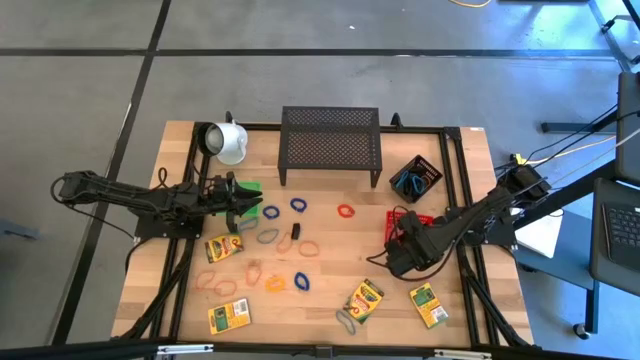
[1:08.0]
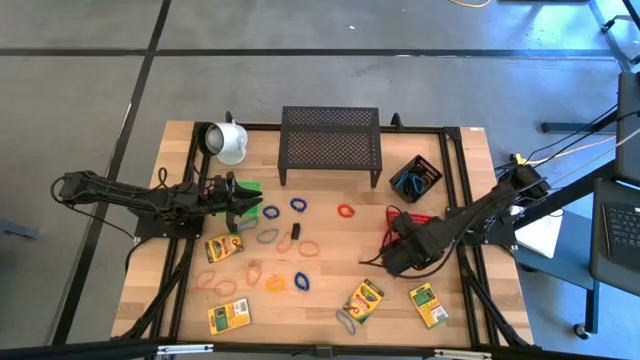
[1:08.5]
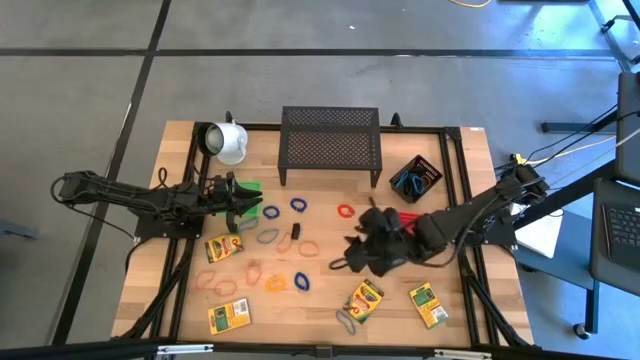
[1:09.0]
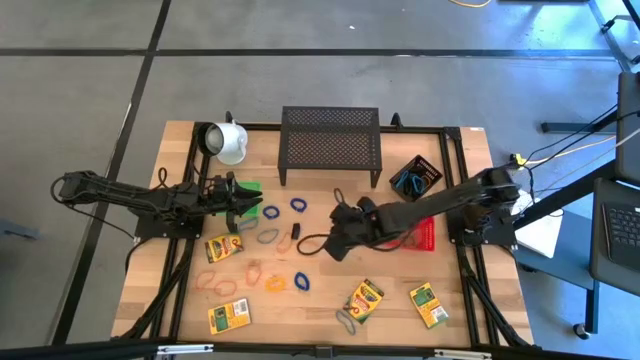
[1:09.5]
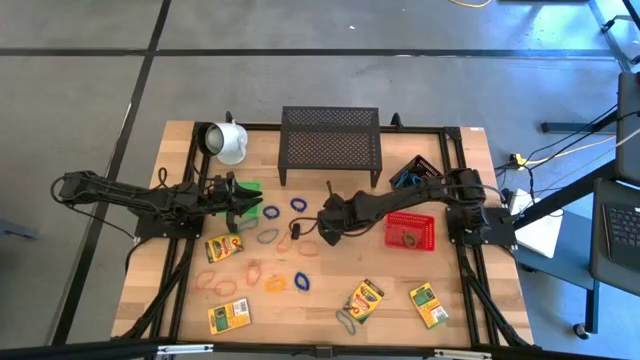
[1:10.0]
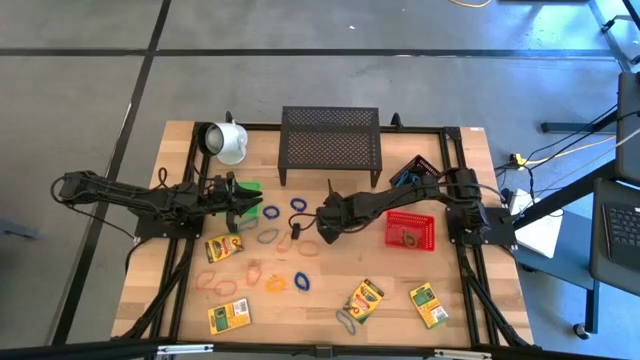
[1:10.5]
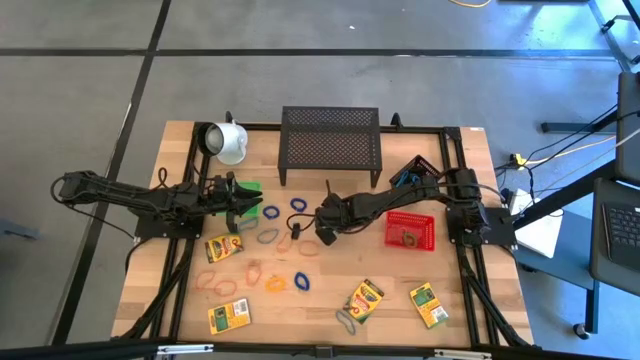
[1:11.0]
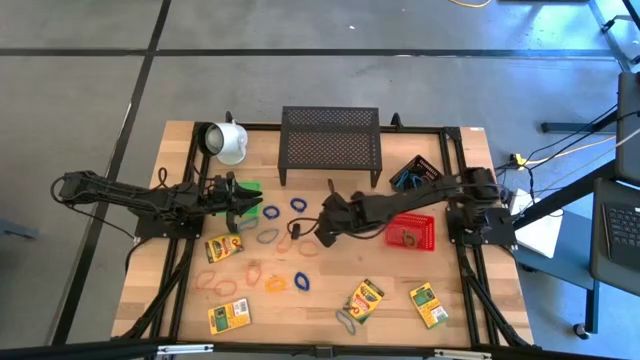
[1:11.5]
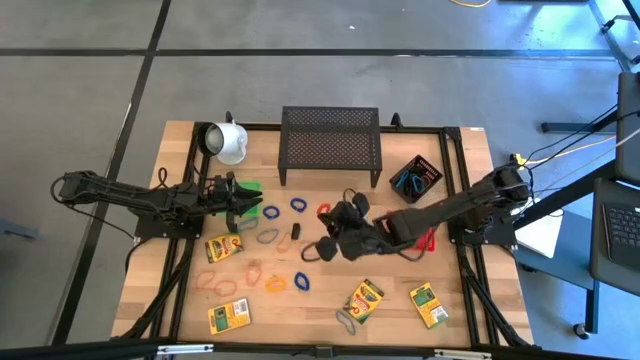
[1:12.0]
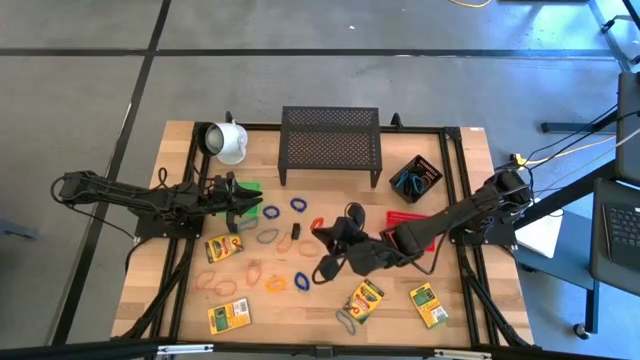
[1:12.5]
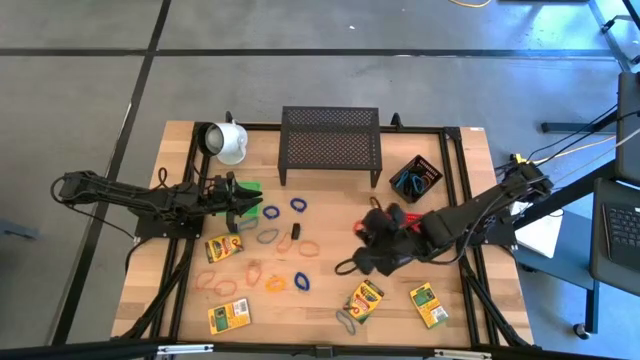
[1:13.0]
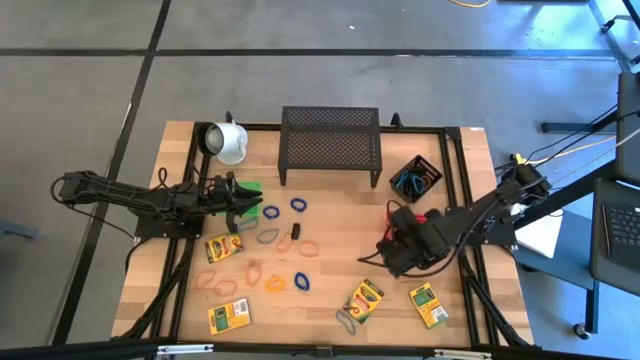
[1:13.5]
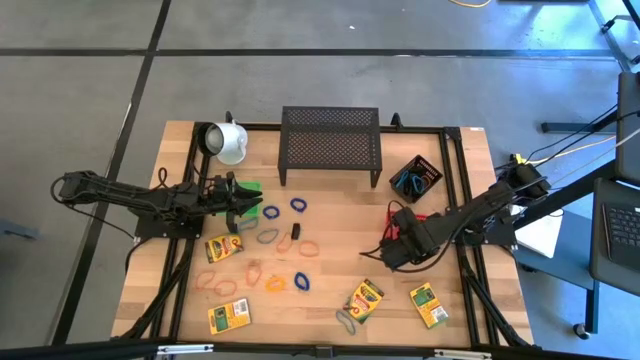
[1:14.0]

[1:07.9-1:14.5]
Task: Pick & Place Office Desk Supplies
Put the orange spring keychain into the orange bin

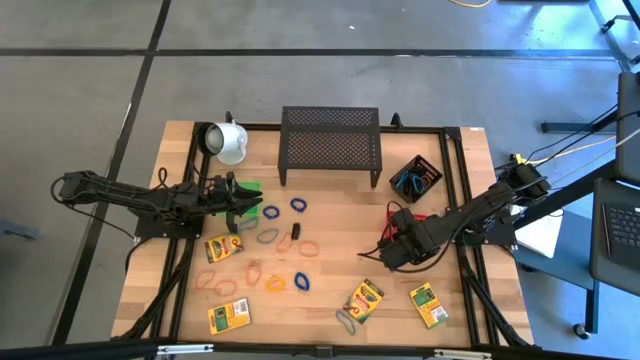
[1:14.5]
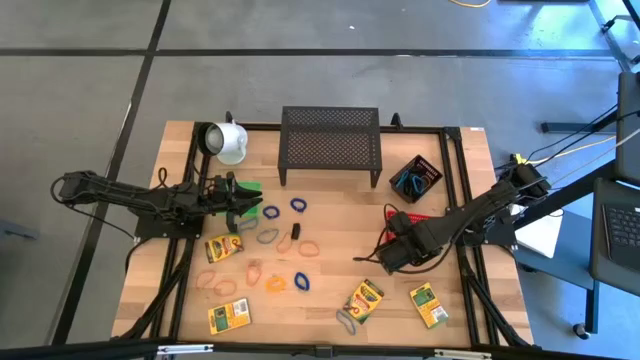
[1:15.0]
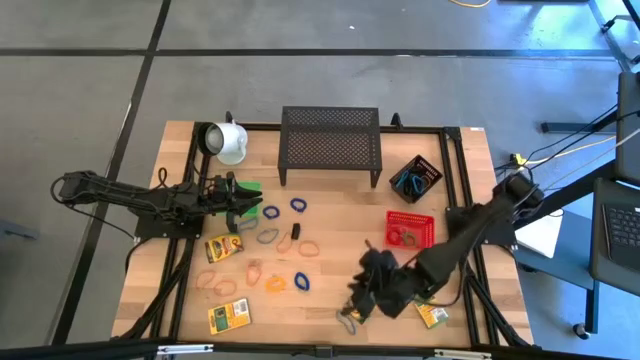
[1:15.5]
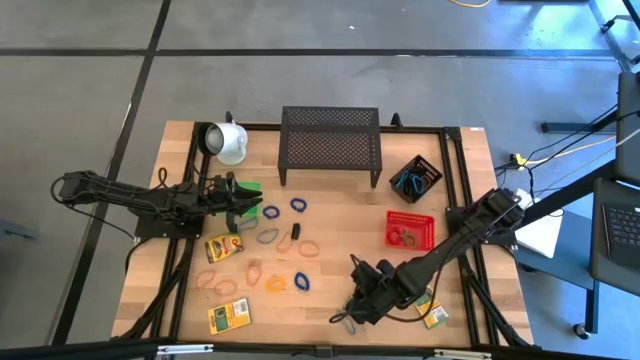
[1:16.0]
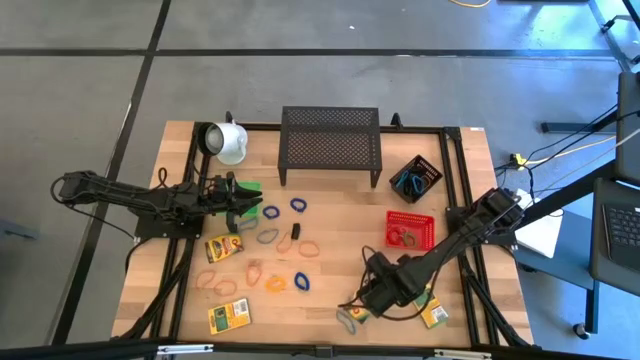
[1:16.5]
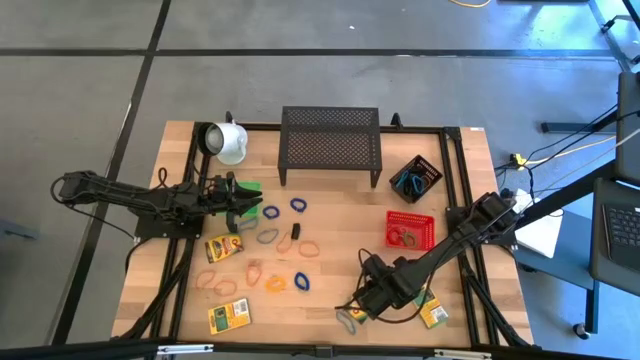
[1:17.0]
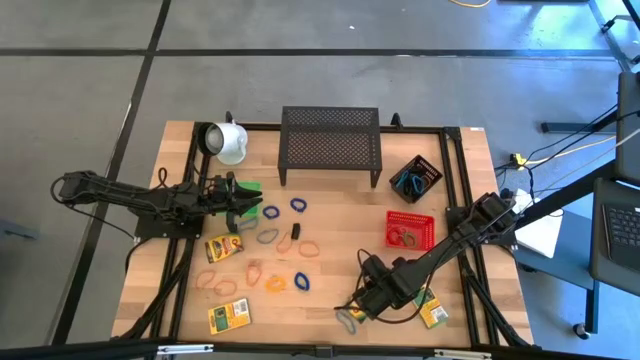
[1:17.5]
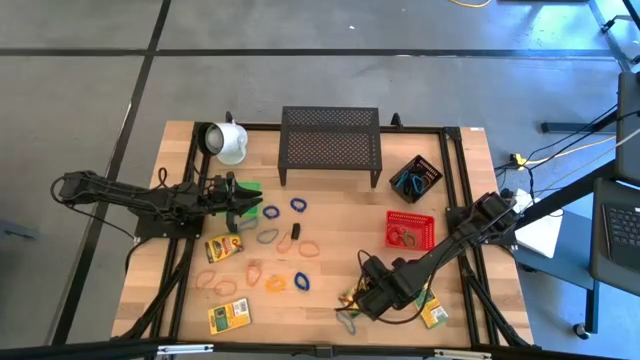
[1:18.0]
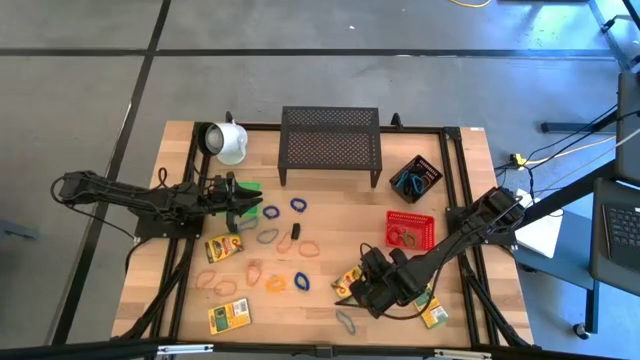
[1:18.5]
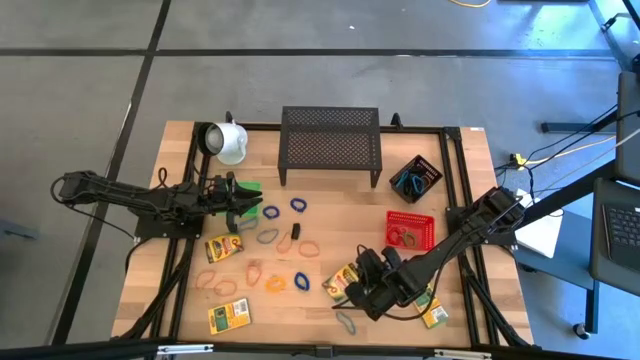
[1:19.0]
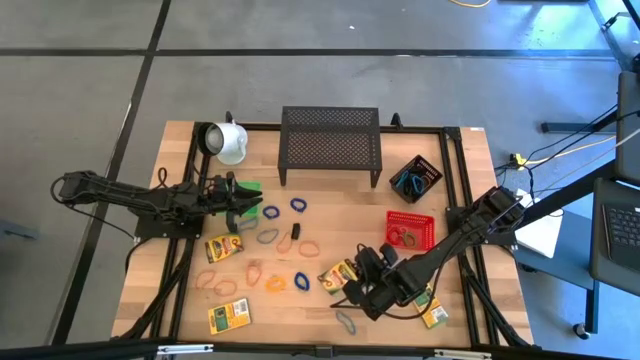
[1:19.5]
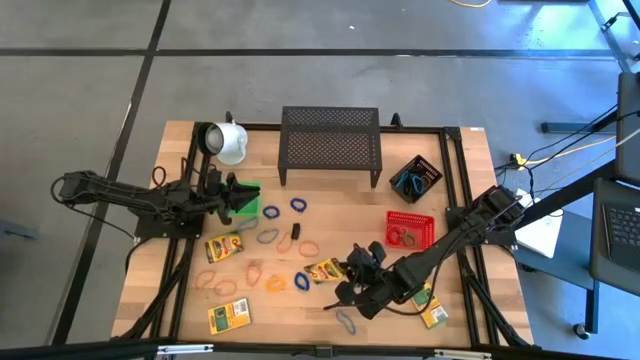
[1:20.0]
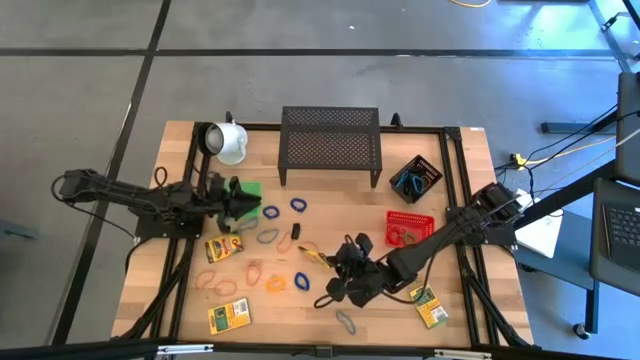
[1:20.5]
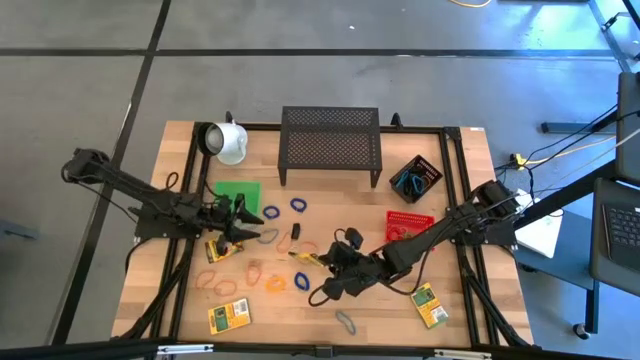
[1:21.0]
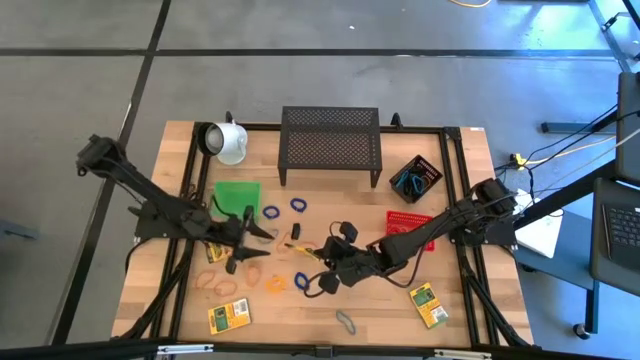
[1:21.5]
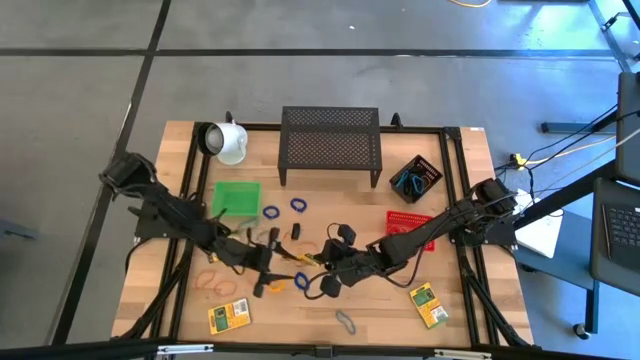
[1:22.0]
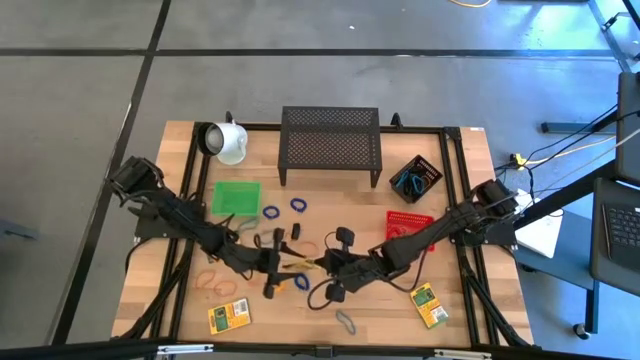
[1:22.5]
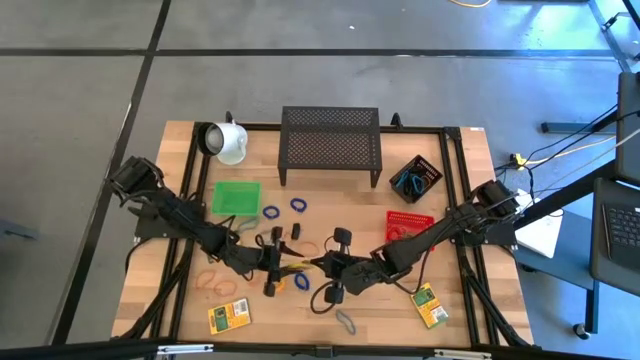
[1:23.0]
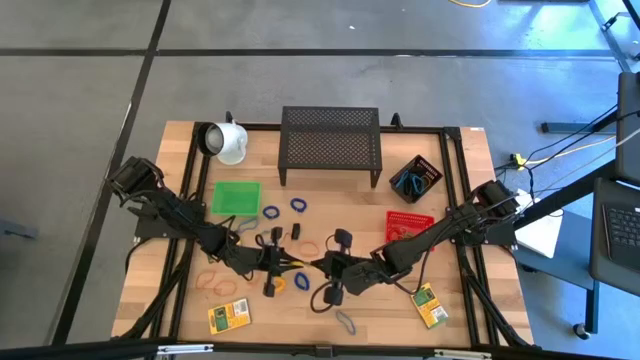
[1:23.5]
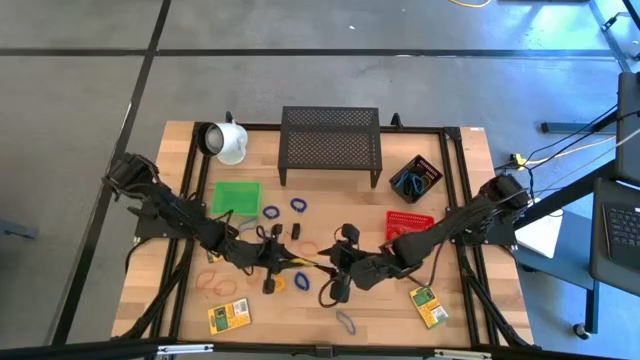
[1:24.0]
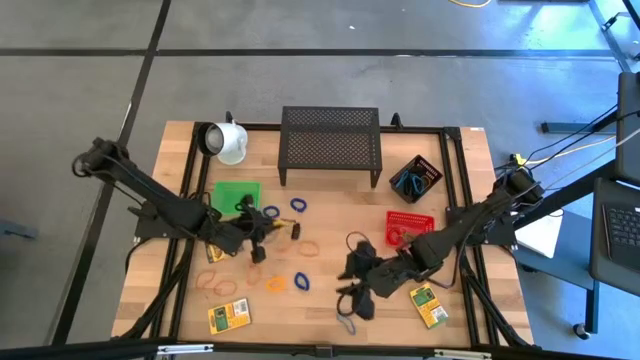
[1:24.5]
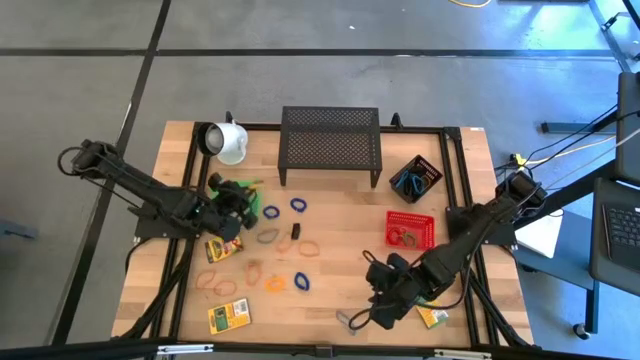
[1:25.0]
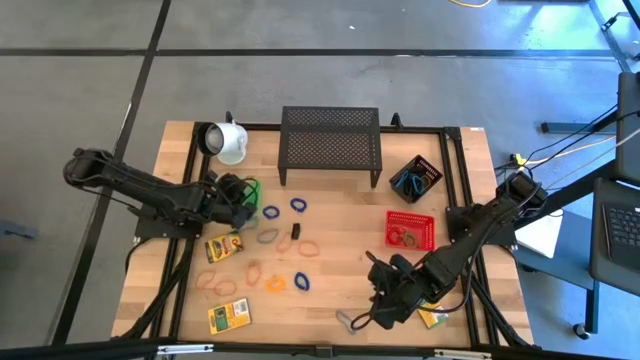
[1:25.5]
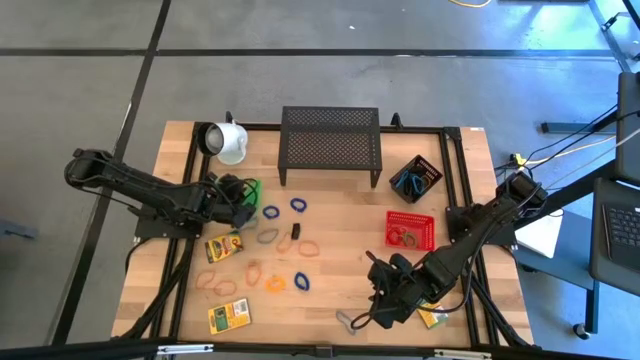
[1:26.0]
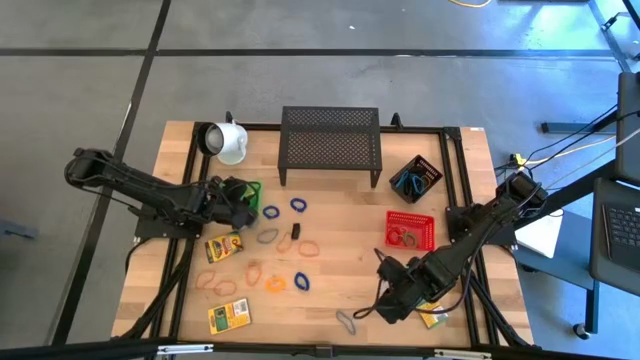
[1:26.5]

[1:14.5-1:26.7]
Put the pack of crayons into the green bin

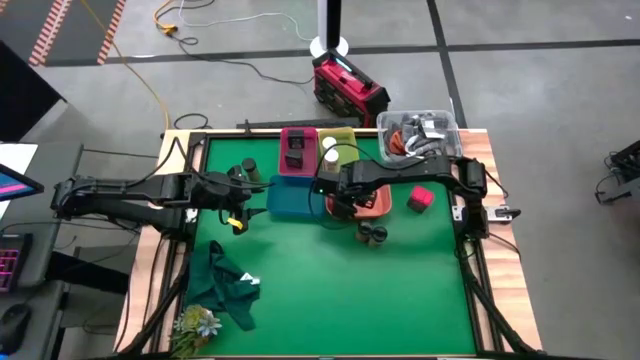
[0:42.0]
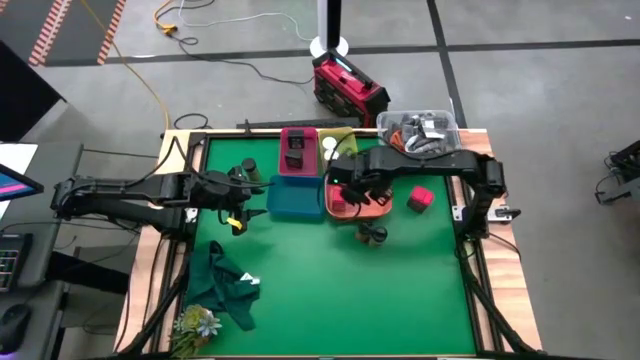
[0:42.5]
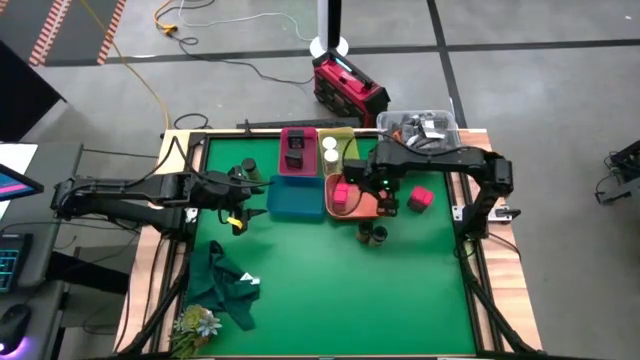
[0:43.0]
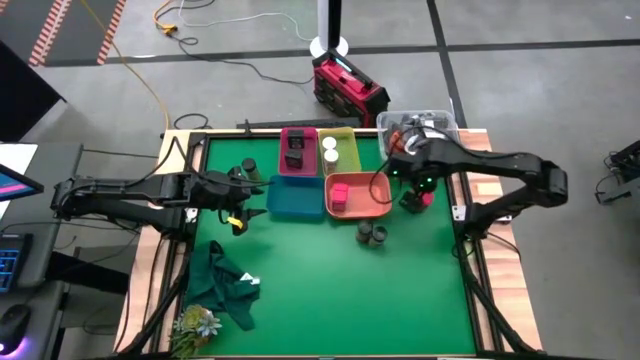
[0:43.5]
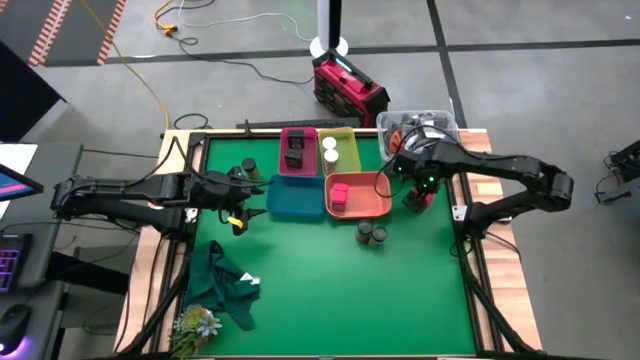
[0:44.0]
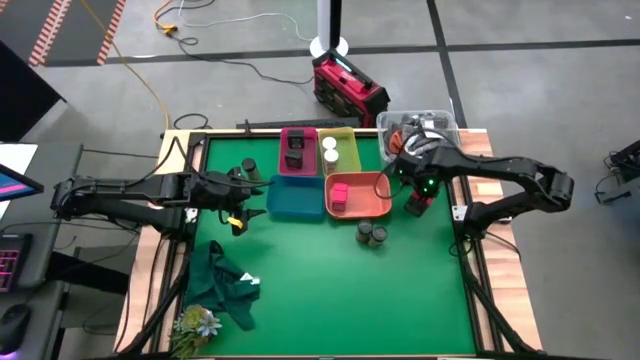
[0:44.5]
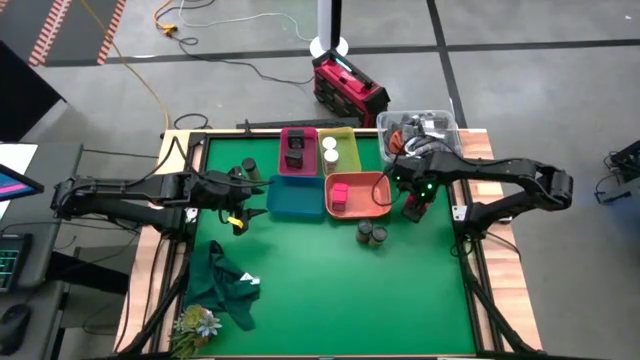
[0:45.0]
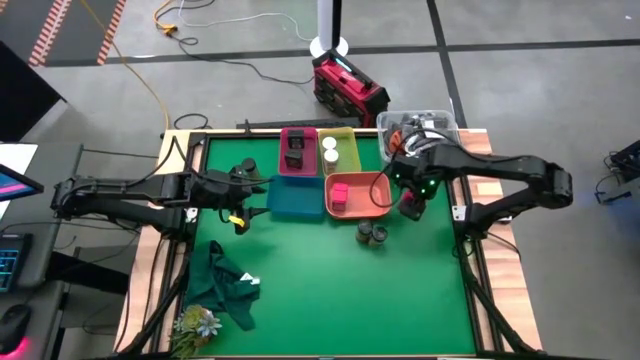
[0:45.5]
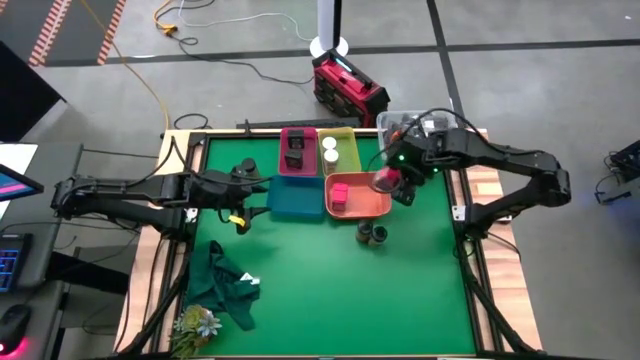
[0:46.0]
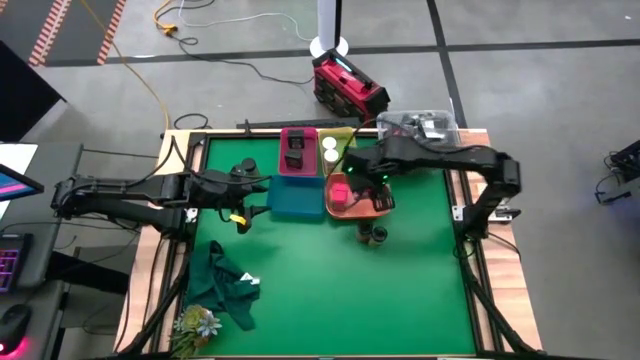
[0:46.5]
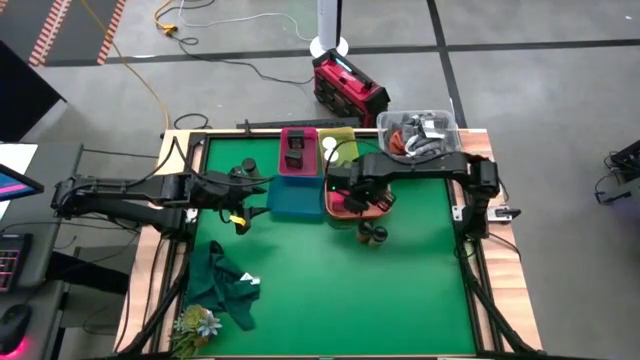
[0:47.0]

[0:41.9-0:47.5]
Task: Sort spices by type
Put the red seasoning can into the orange bin
